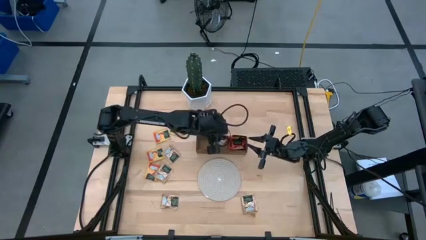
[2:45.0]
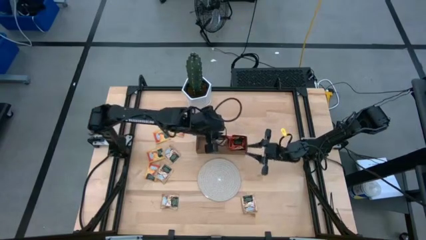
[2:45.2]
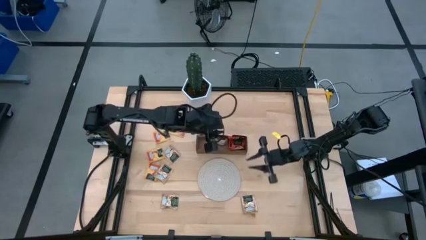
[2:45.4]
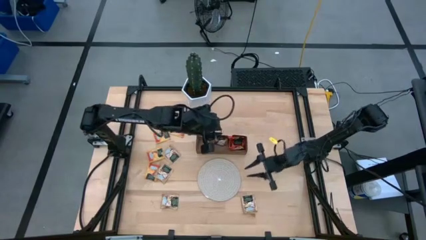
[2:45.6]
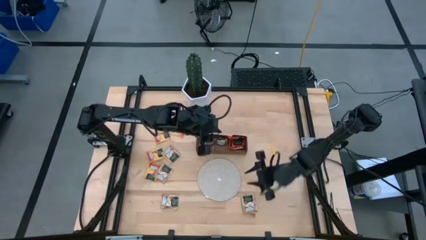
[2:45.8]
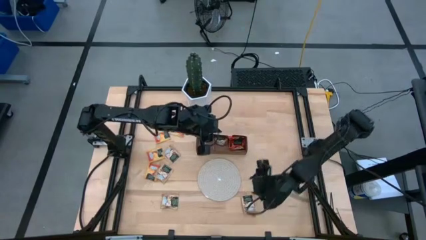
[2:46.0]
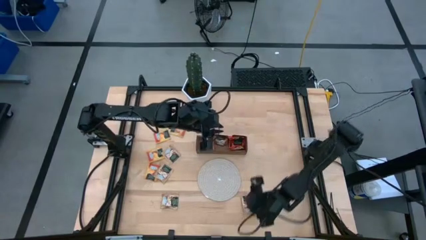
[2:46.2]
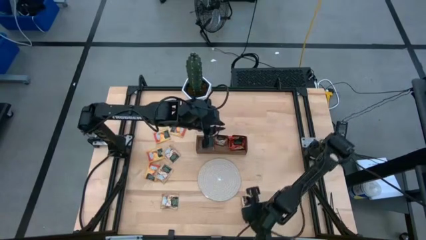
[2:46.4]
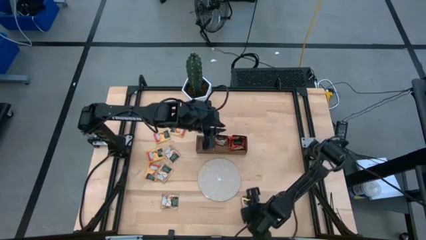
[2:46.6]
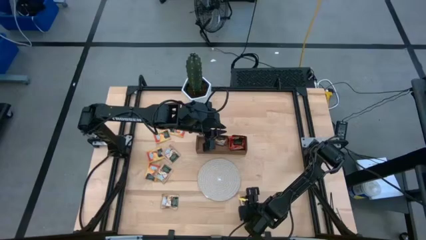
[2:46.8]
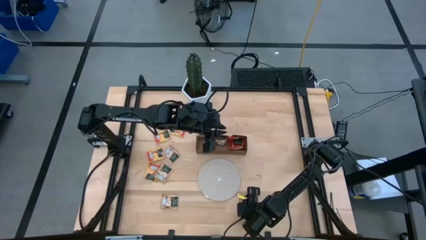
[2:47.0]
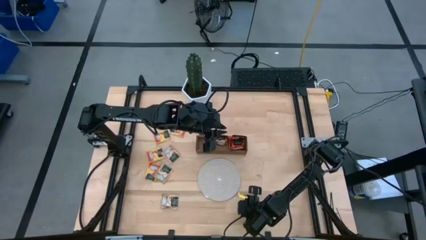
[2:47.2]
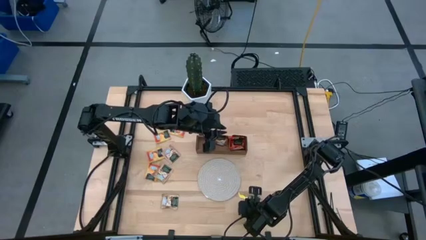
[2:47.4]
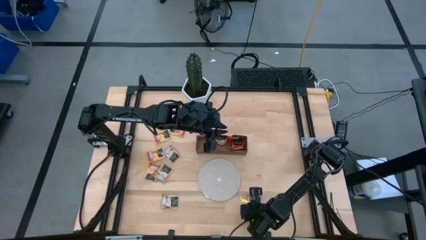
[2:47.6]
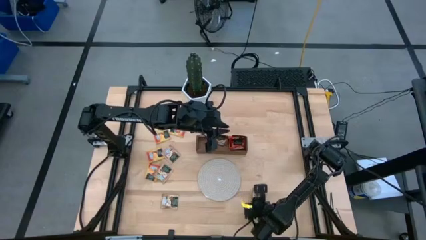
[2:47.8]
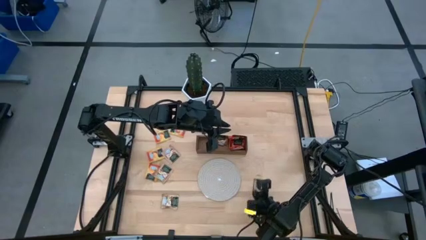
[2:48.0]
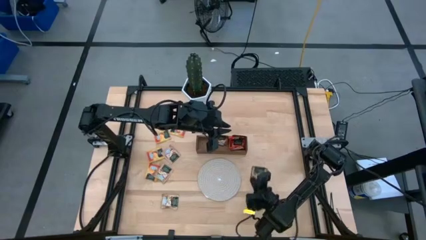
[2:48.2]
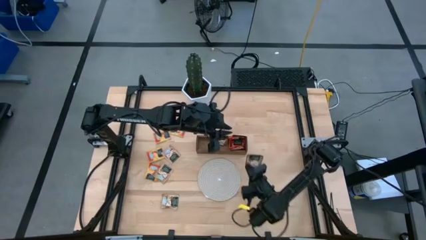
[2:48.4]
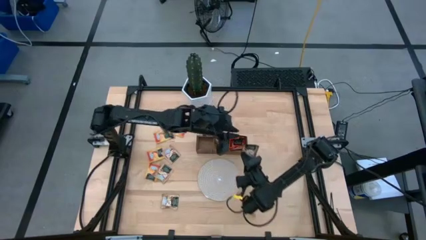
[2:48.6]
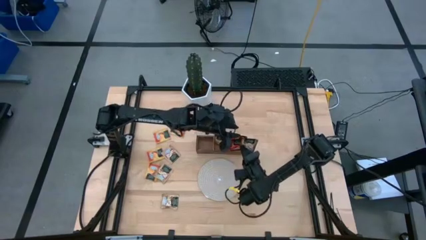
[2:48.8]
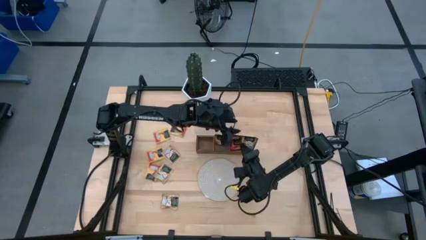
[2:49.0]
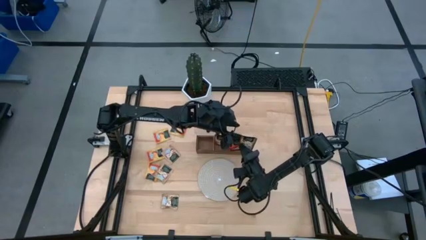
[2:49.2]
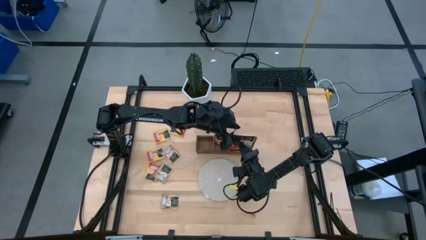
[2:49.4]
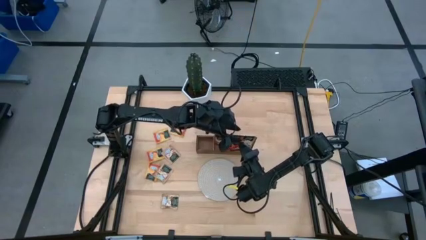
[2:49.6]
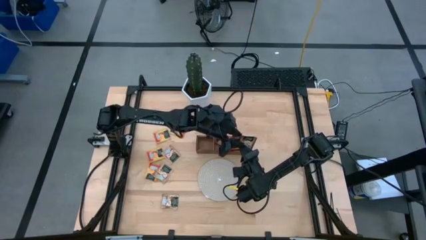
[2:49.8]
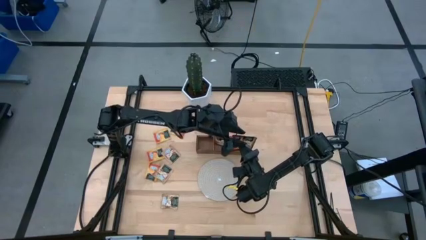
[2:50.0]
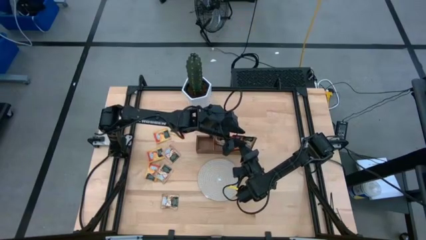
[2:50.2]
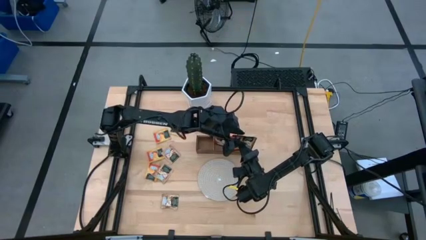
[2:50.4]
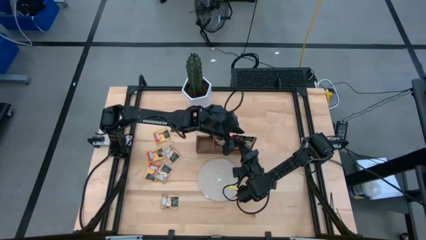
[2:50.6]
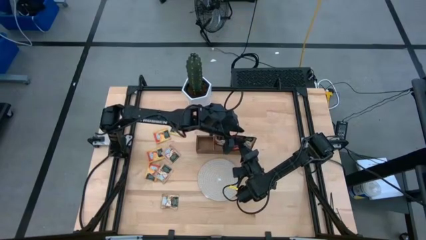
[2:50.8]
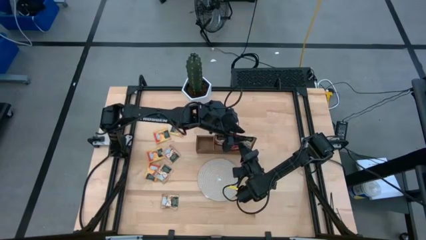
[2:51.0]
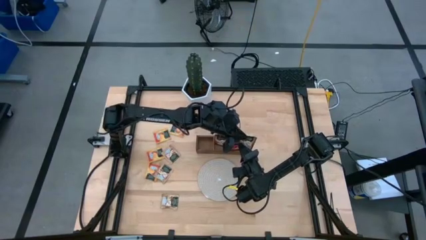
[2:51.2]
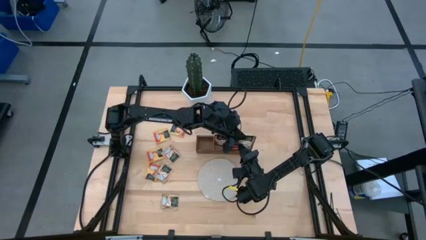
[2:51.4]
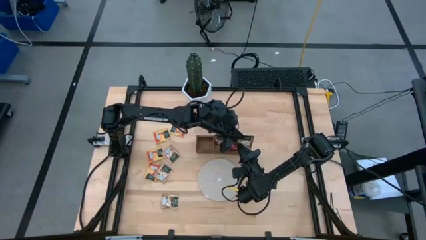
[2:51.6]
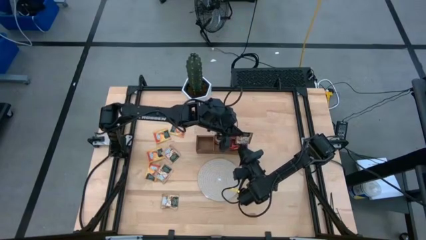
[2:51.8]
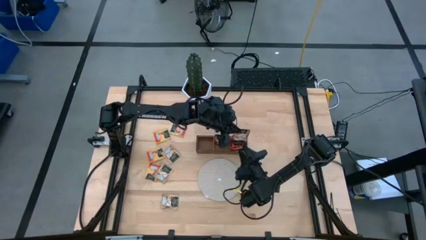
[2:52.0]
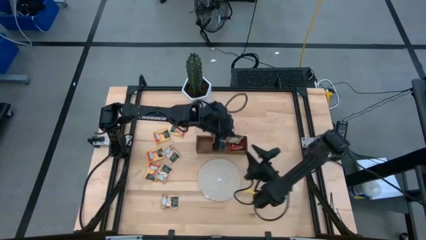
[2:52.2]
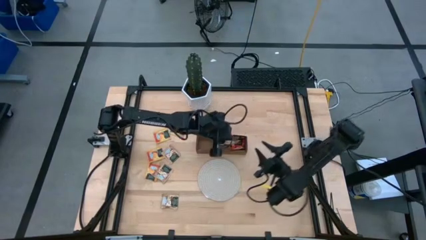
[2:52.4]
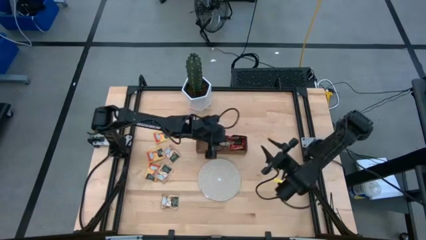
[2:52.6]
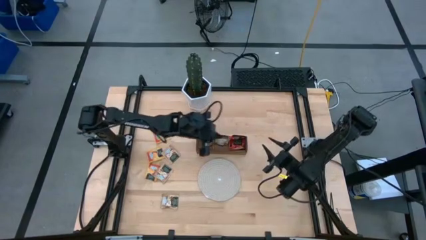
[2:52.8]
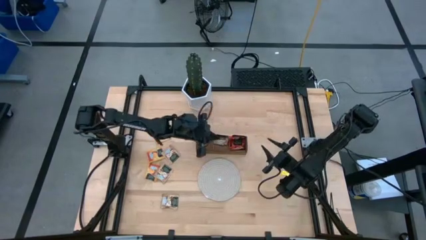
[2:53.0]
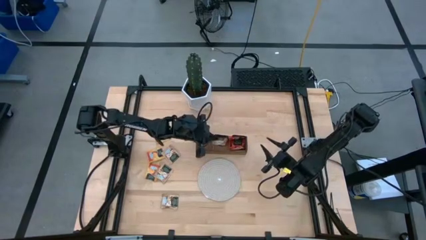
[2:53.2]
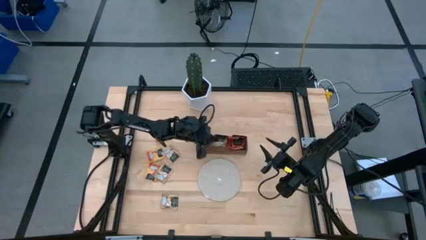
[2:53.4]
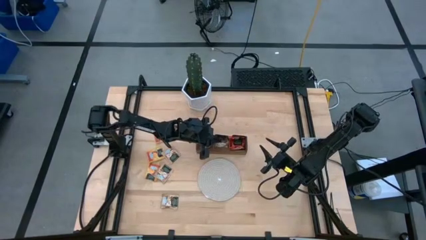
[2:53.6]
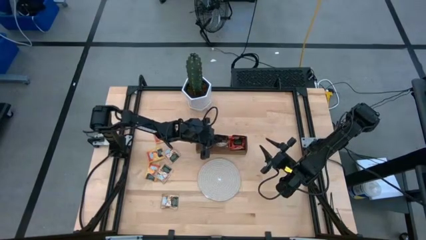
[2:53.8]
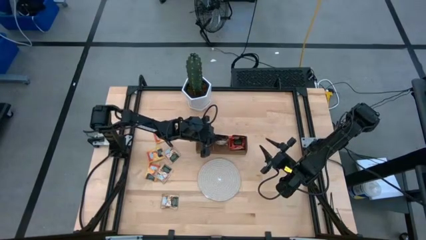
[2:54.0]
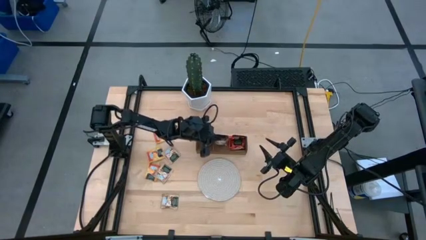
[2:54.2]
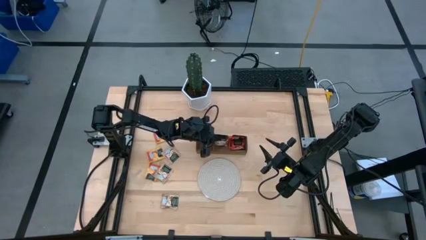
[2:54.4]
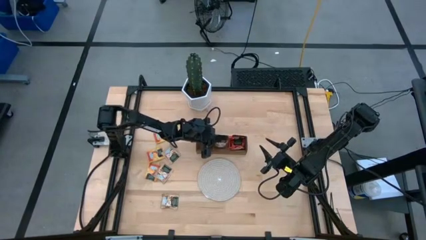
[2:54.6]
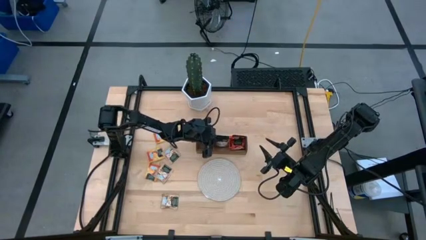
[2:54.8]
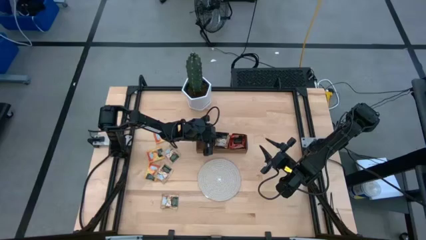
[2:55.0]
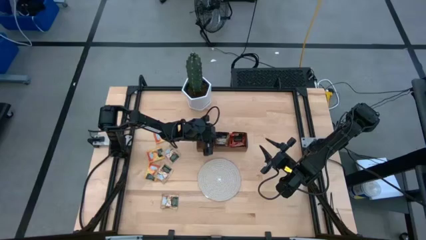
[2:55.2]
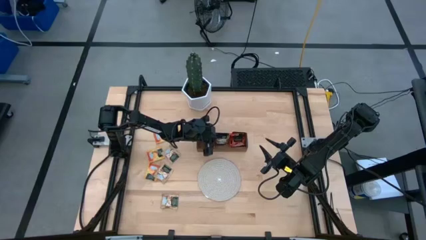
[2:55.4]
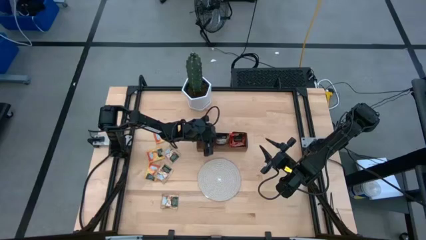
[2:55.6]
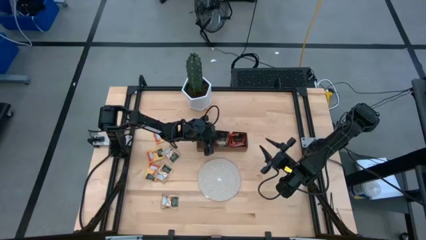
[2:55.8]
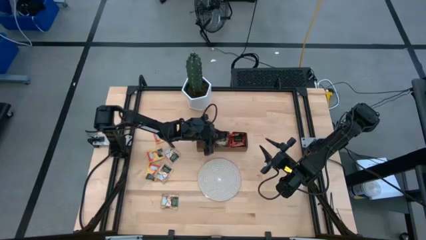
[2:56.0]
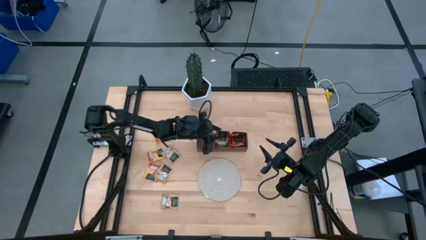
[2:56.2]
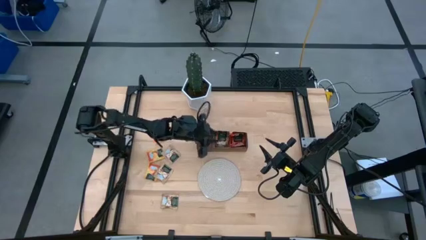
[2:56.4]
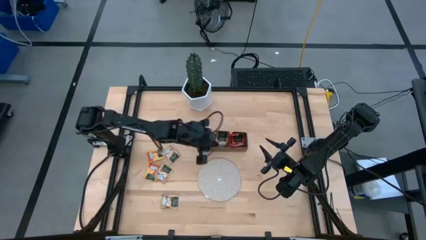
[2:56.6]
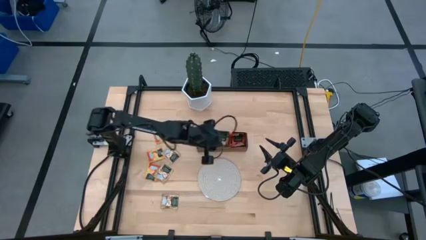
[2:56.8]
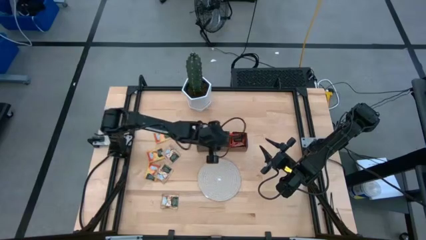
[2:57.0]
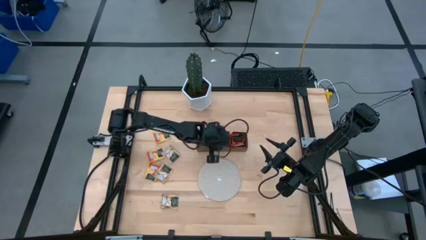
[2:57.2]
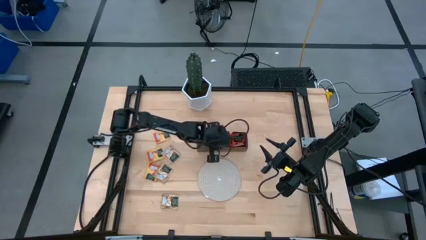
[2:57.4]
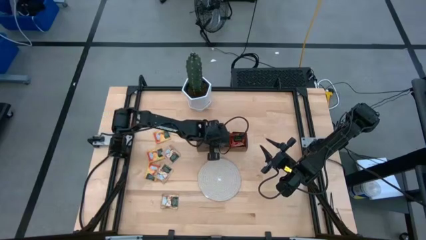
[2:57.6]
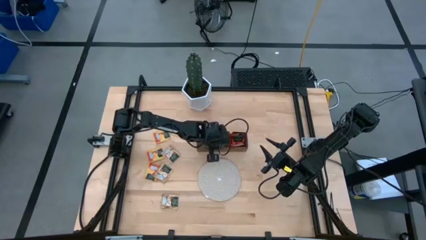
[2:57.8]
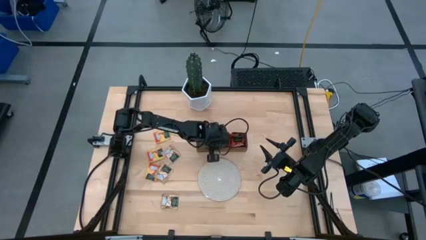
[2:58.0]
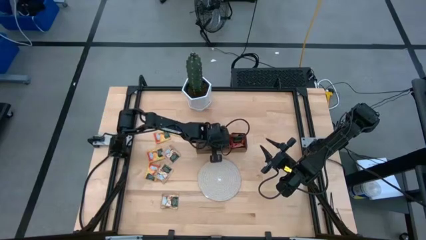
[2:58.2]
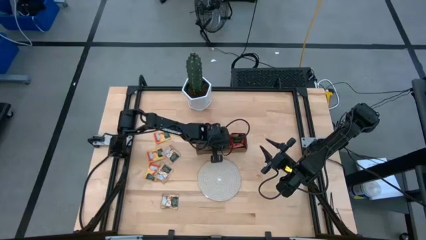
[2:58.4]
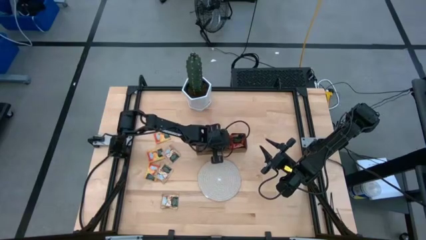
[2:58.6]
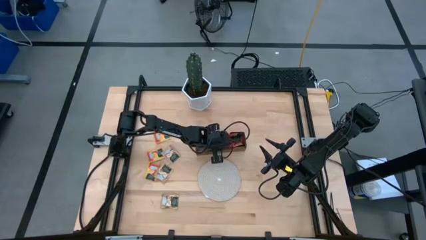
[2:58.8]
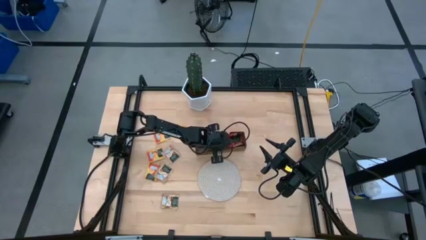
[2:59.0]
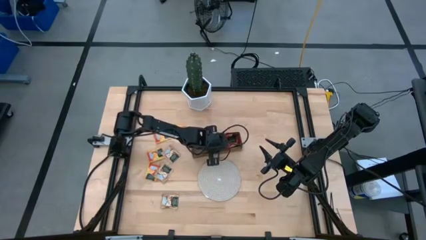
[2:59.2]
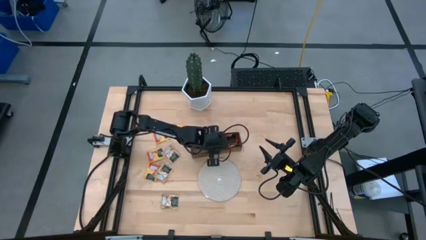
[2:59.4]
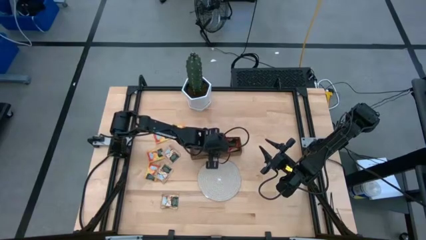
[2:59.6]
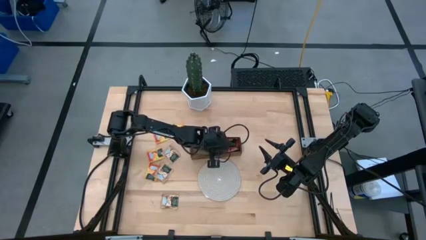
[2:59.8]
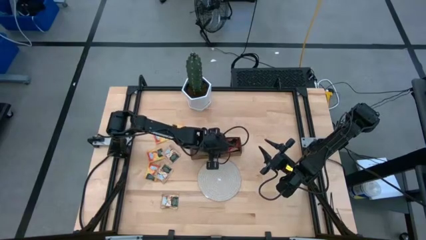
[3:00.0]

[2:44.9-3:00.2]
Task: Pick & Place Tea
Put the brown tea bag into the middle section of the wooden organizer

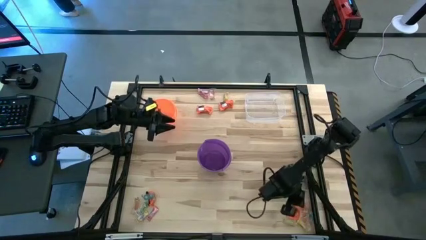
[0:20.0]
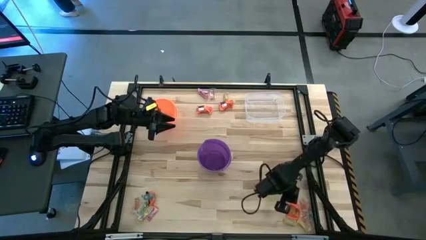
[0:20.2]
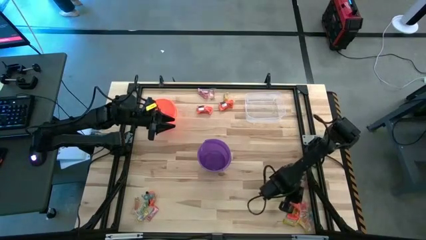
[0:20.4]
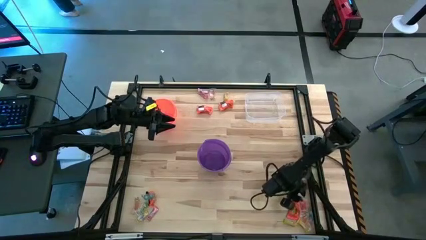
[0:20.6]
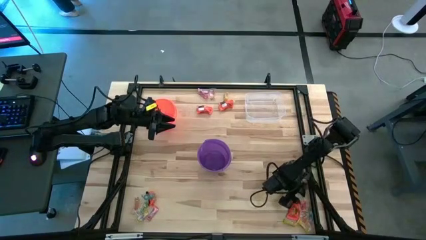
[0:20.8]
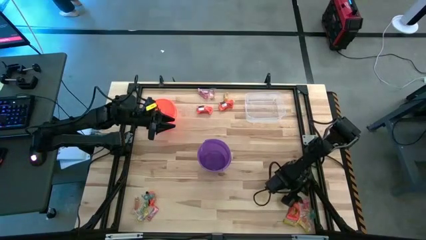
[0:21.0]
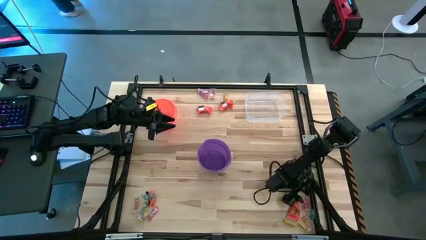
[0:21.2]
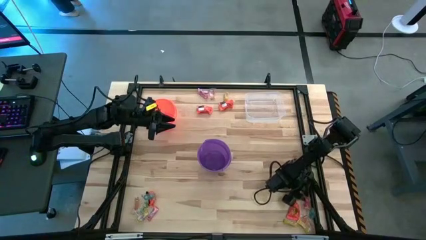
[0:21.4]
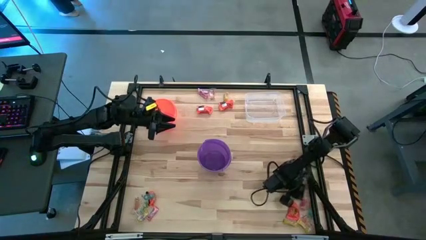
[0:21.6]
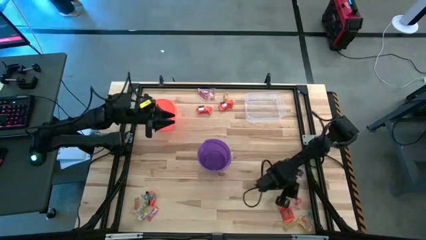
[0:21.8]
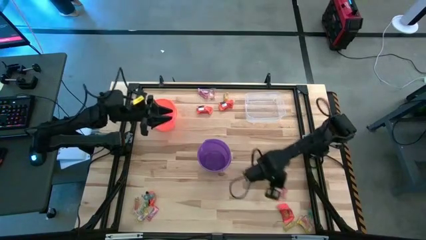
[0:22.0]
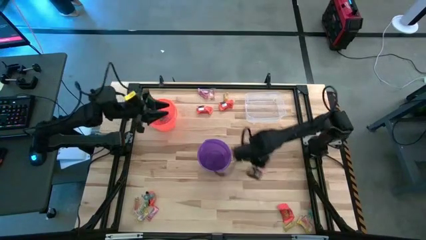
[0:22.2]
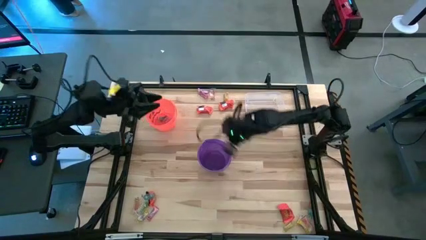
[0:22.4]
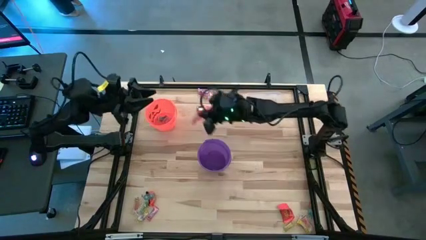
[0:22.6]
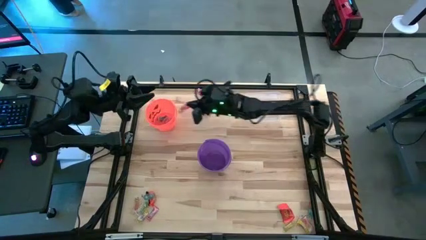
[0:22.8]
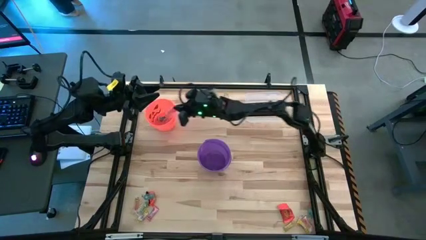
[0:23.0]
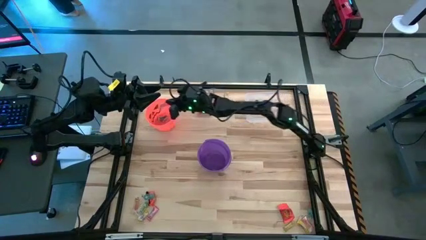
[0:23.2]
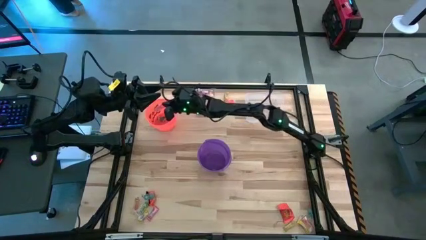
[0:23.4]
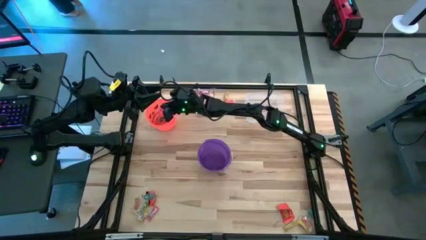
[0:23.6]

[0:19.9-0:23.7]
Task: Sort candy by brand, put in halloween buckets
Put the orange gummy into the orange bucket
